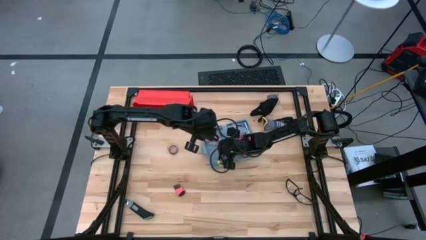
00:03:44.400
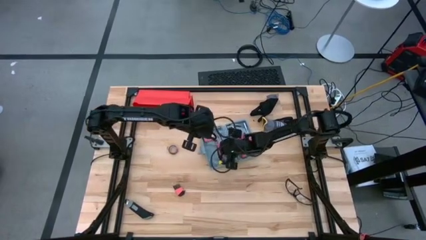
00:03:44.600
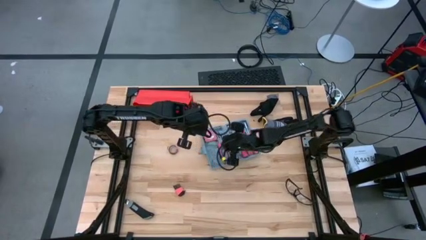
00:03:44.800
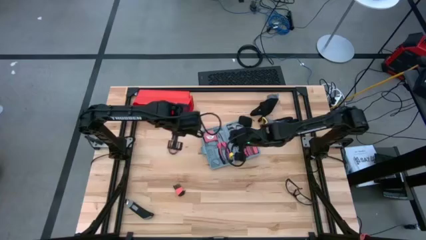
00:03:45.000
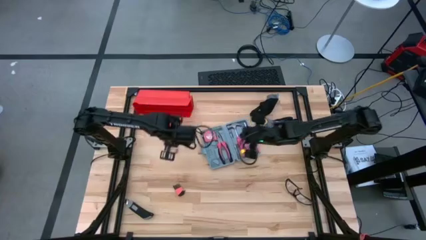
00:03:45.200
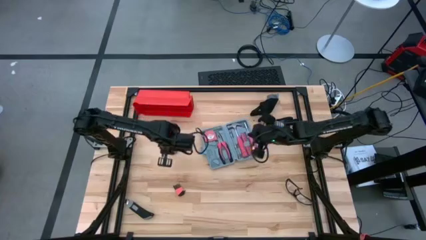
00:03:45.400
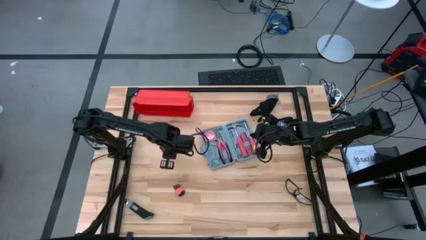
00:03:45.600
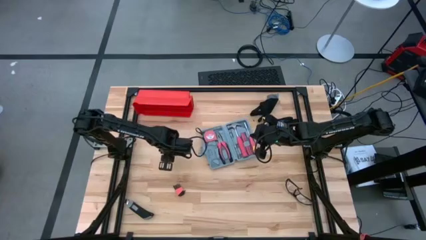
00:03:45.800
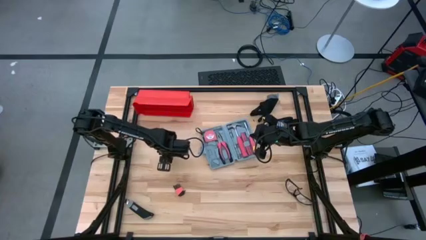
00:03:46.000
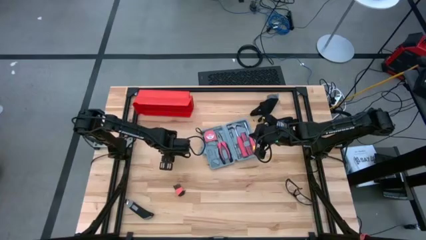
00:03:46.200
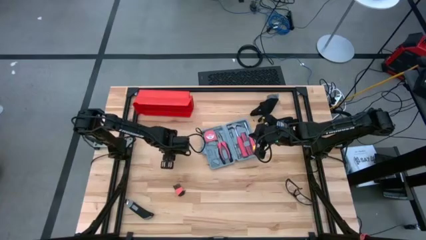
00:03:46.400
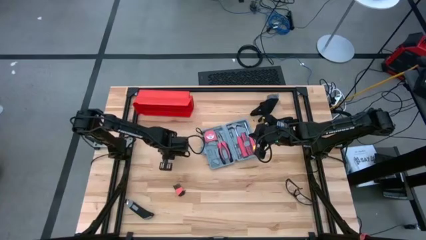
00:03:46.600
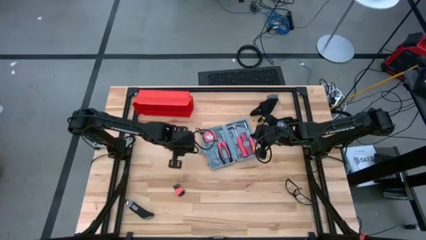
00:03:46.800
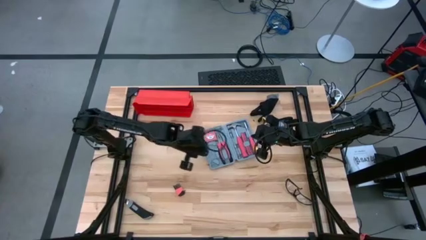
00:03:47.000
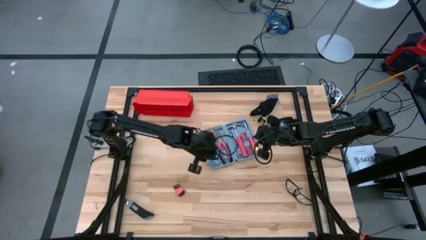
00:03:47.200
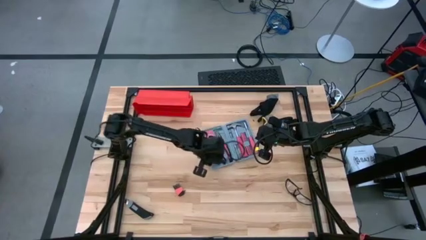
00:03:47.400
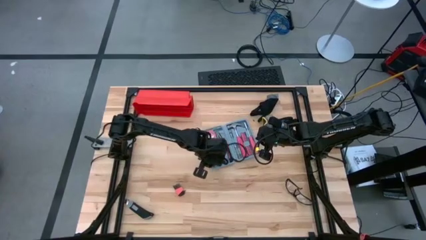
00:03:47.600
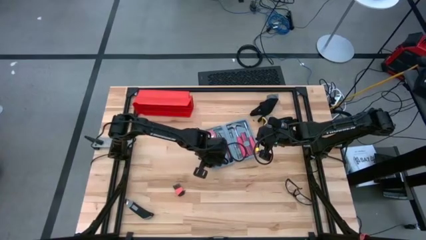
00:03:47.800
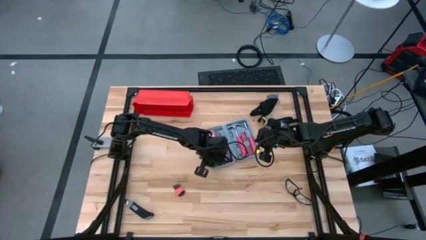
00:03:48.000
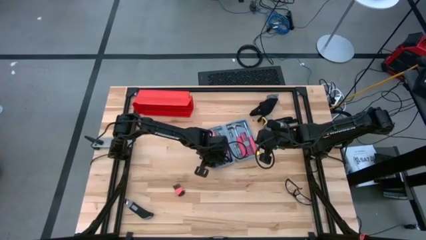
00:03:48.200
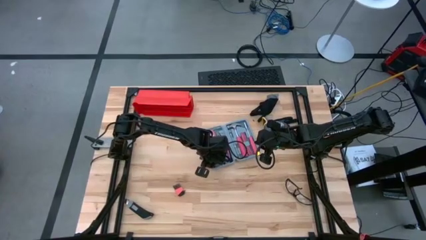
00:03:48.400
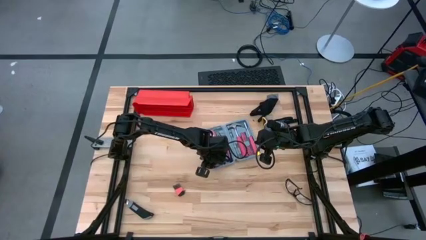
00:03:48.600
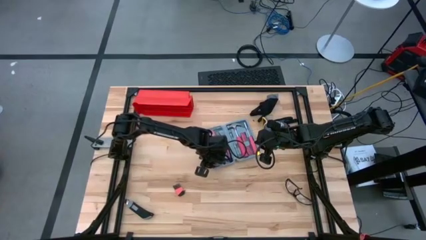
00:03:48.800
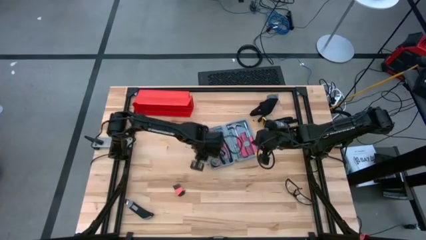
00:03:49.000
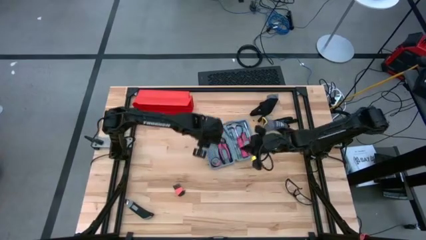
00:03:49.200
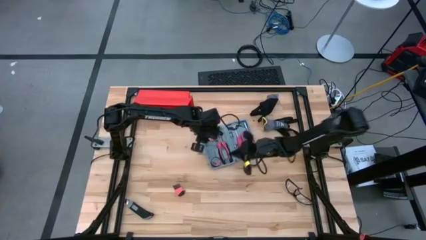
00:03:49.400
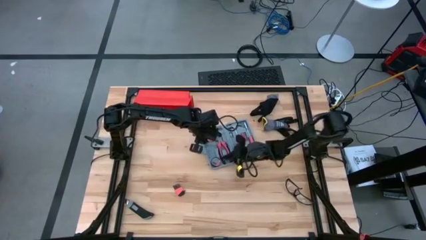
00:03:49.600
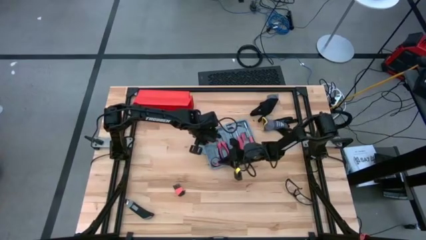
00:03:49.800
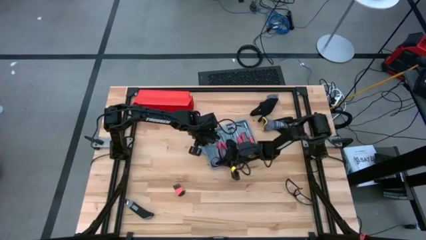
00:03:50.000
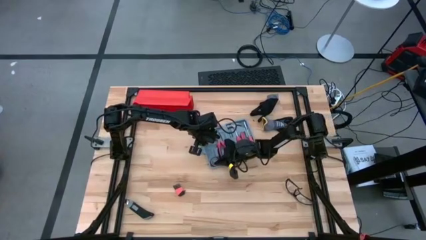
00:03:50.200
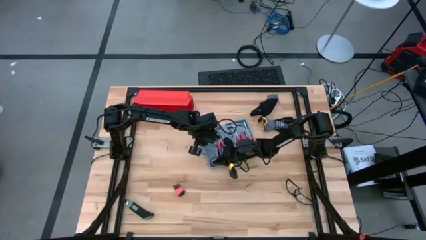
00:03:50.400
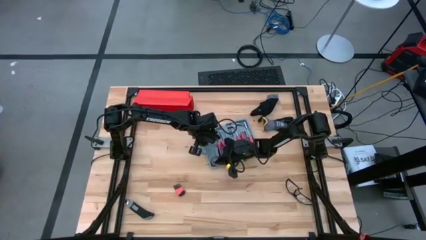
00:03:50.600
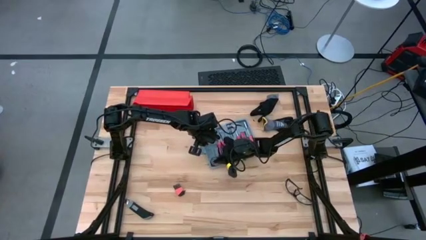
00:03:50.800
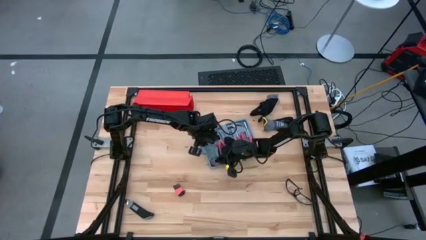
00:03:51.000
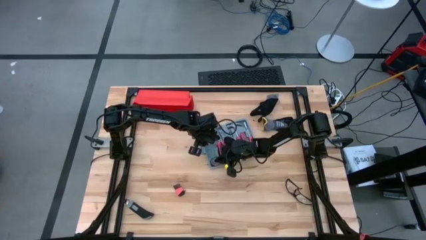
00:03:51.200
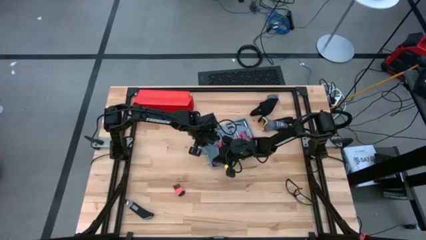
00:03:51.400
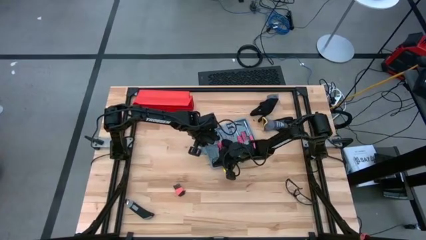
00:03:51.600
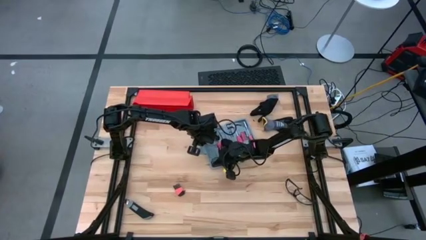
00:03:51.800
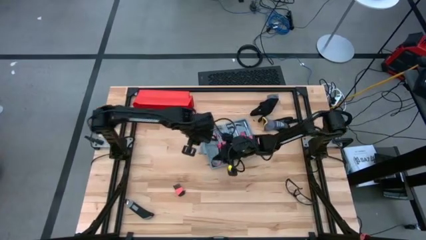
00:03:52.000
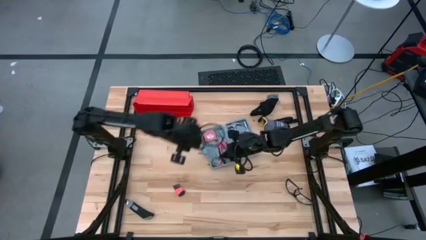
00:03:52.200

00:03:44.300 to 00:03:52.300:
Task: prefit tool cases
Put the black electrical tape into the gray pre-fit tool case

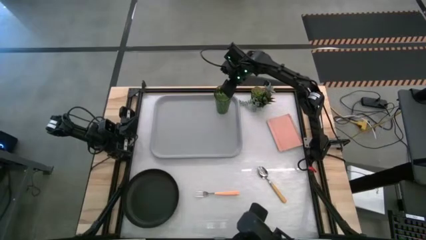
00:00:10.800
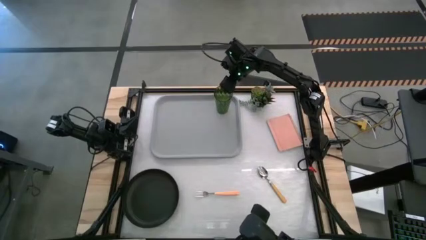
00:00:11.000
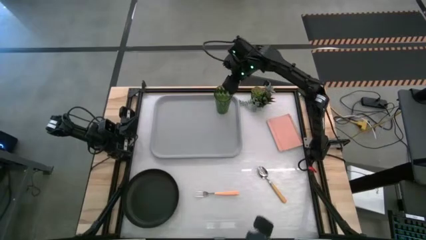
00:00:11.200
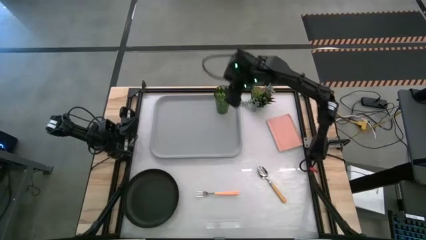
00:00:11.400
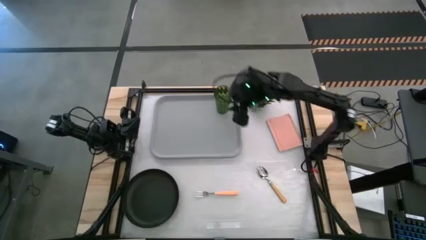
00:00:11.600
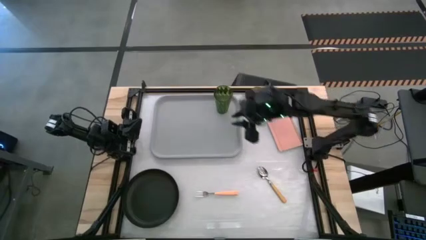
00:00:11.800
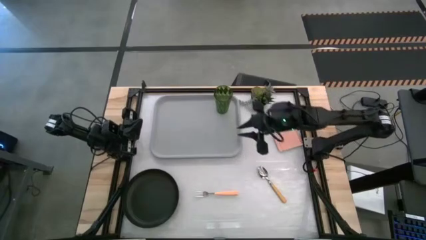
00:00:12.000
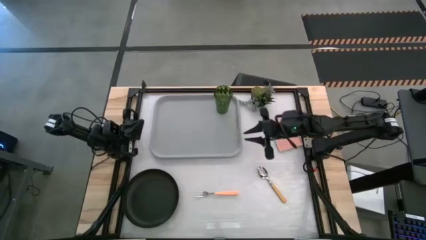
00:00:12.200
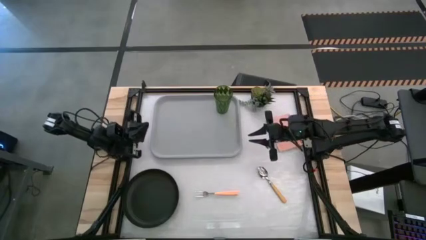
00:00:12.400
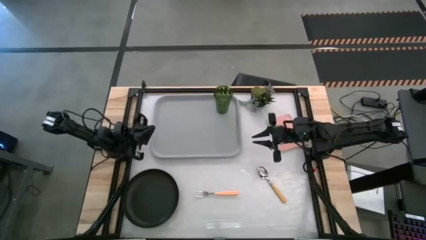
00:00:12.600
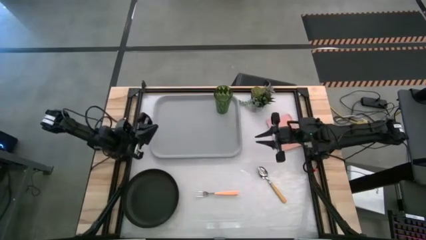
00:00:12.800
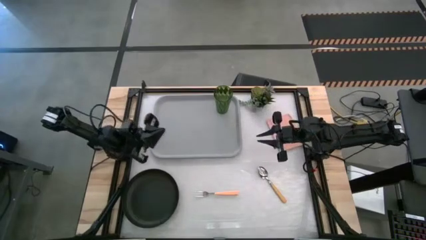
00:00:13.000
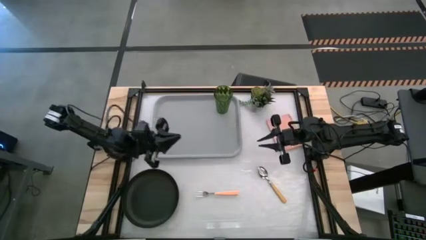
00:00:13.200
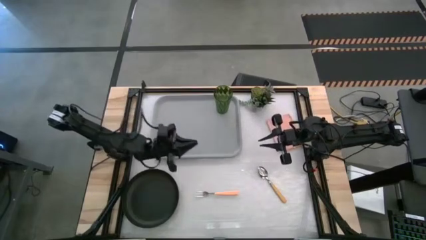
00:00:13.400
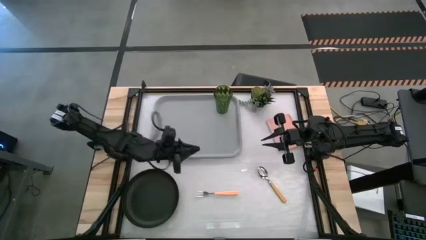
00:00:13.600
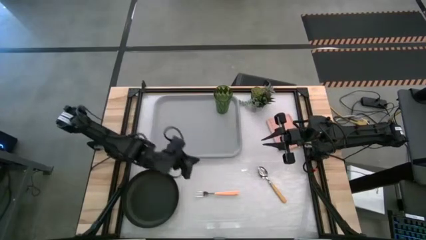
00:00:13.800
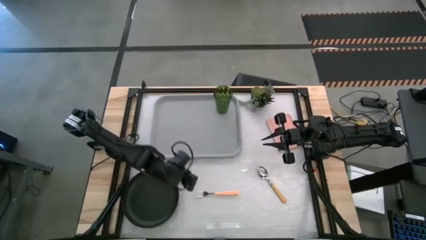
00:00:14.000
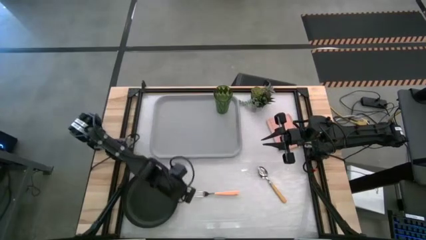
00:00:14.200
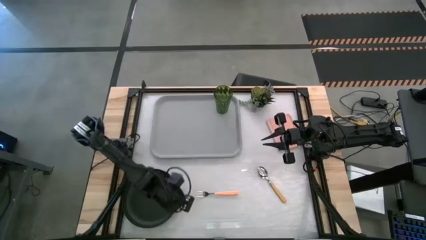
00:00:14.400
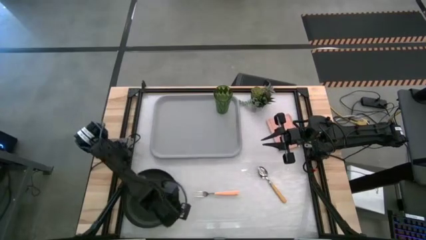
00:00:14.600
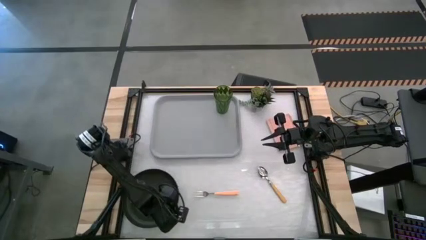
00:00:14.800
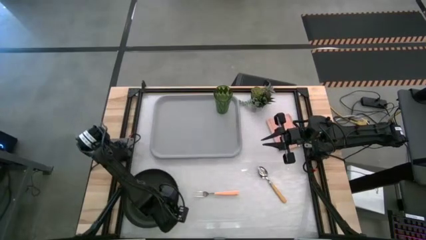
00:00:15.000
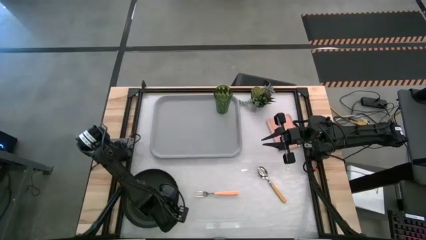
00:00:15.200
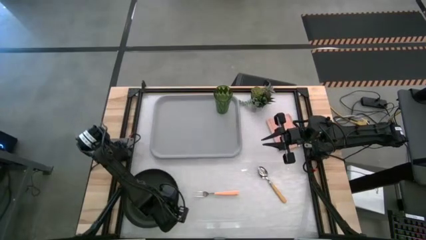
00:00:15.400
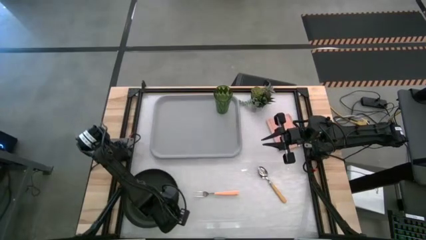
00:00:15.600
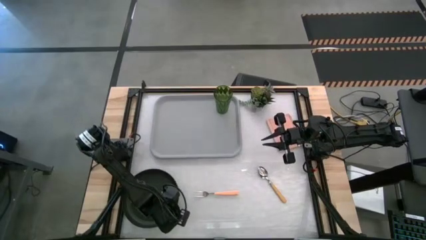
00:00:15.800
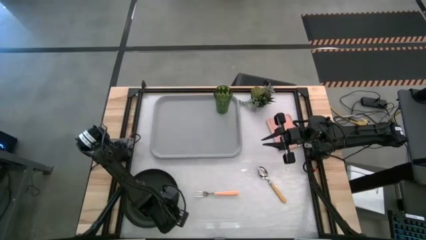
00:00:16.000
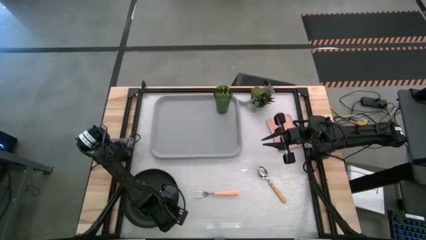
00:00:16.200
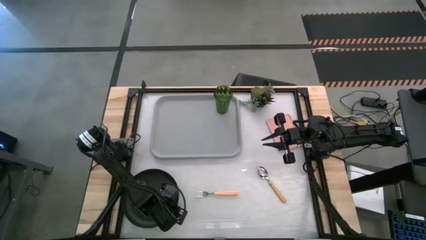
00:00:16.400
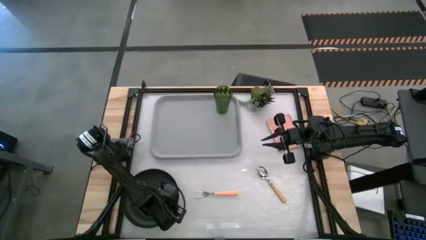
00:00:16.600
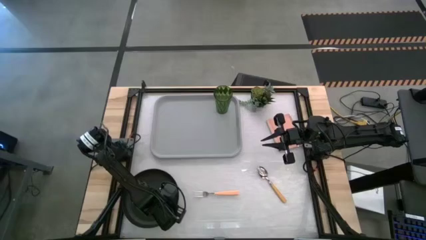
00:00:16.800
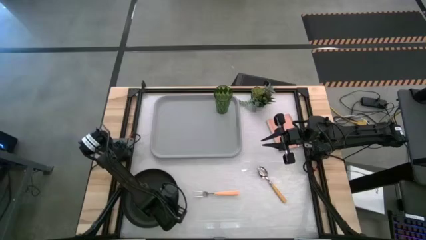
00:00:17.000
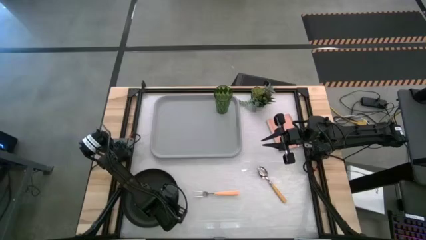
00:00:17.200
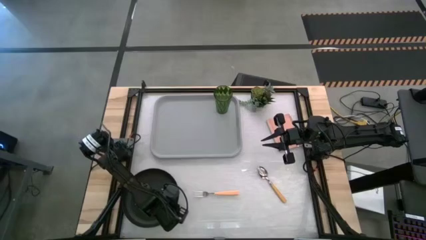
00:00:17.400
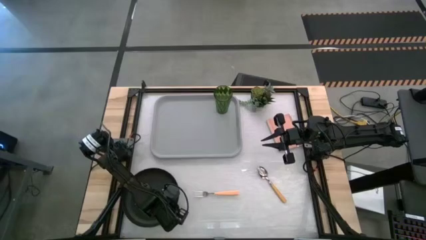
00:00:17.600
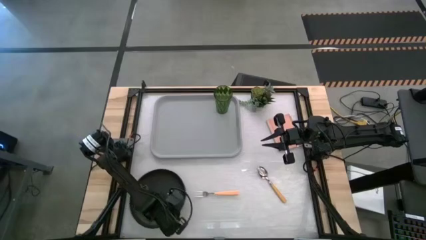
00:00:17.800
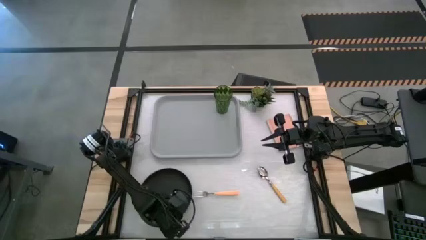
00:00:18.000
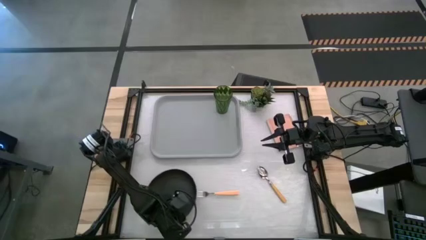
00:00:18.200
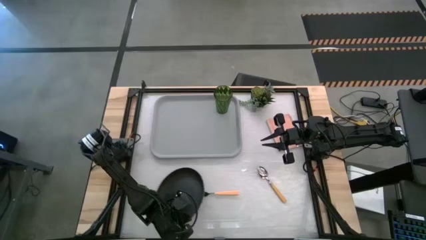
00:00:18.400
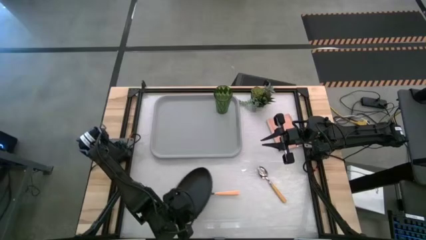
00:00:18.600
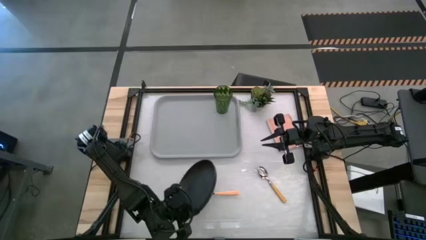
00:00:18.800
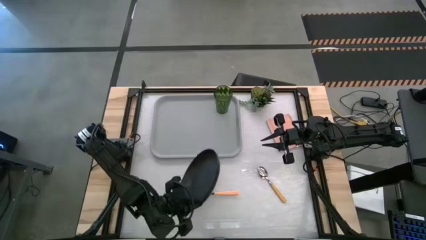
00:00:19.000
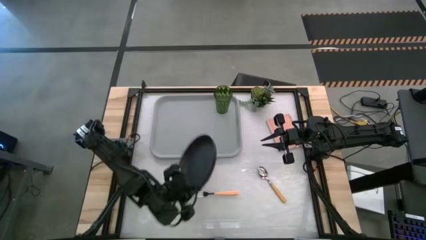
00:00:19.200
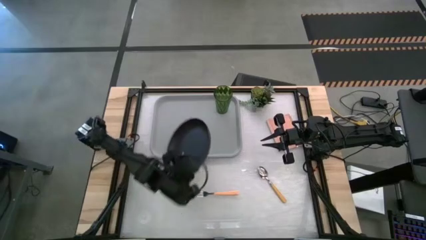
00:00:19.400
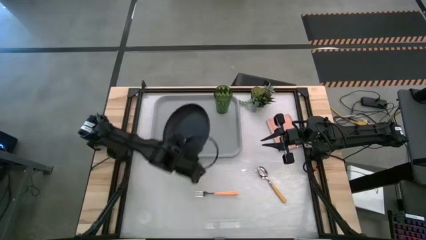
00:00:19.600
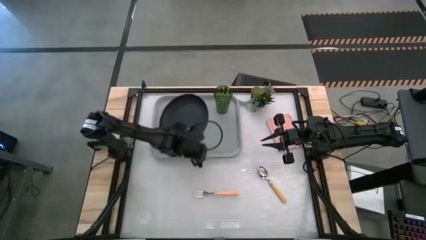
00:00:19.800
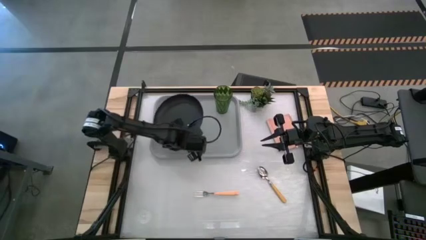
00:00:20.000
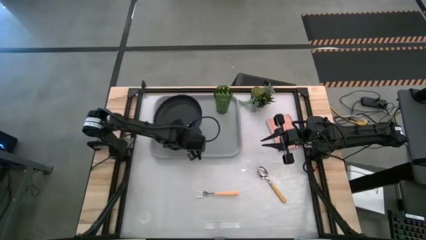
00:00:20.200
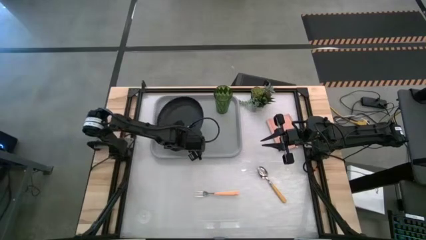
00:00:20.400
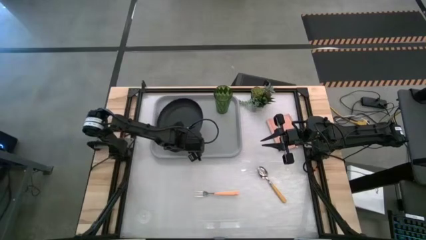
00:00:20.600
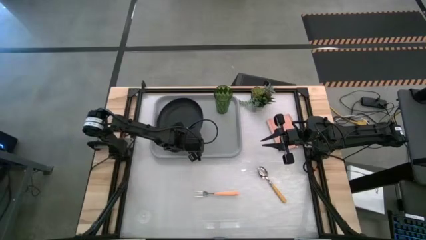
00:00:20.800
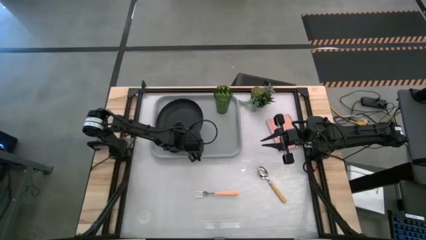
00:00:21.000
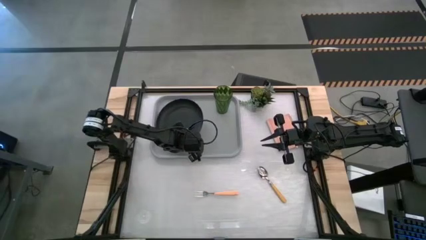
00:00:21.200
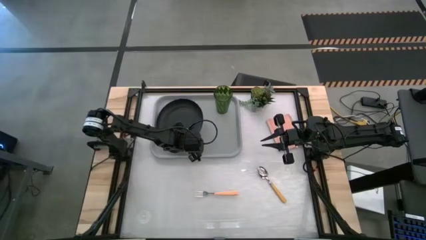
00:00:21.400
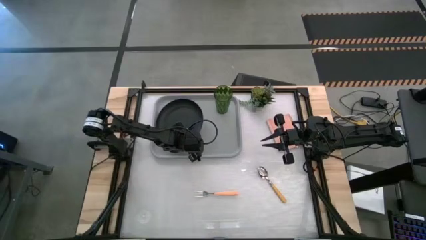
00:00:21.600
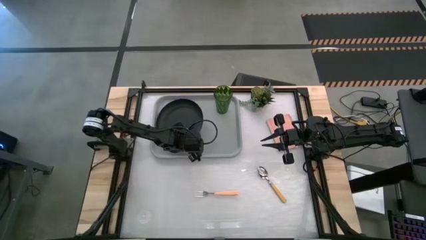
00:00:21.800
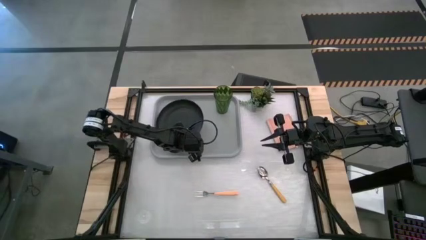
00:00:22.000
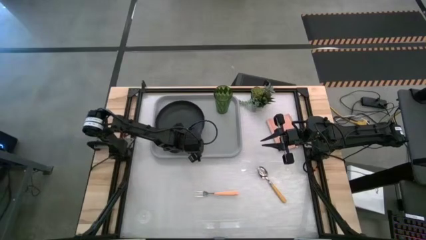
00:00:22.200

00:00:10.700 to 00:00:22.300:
Task: Pick and place plate/cup/fork/spoon on tray
Put the black plate on the gray serving tray on the left of the green cup
